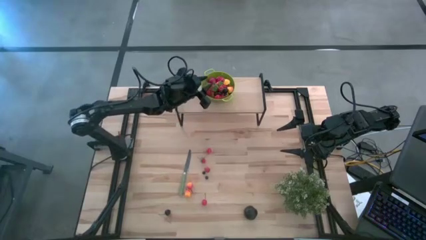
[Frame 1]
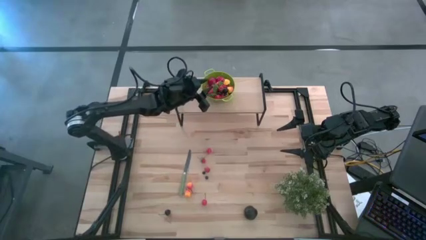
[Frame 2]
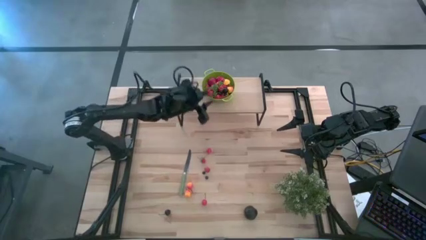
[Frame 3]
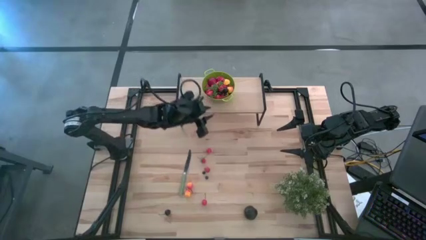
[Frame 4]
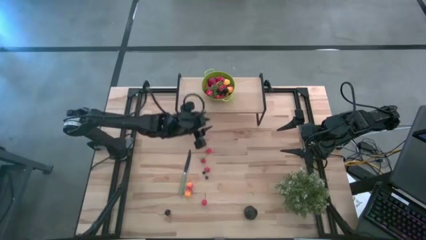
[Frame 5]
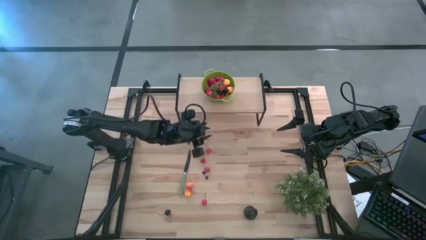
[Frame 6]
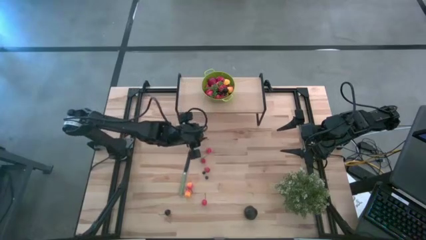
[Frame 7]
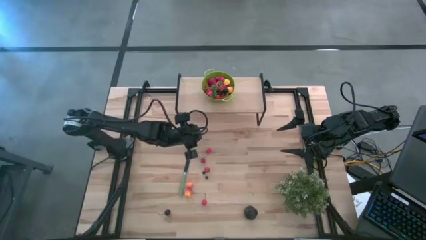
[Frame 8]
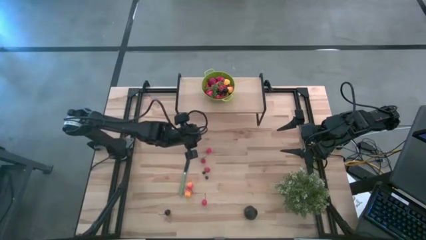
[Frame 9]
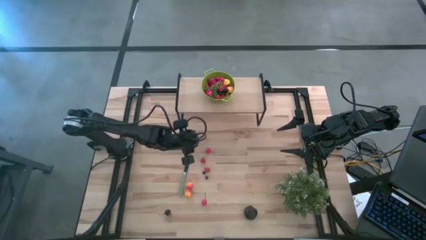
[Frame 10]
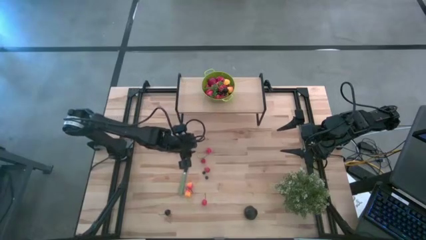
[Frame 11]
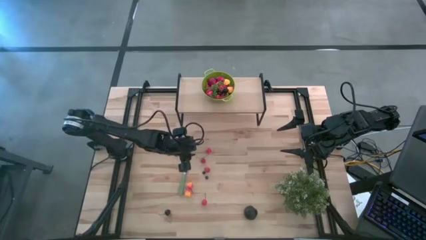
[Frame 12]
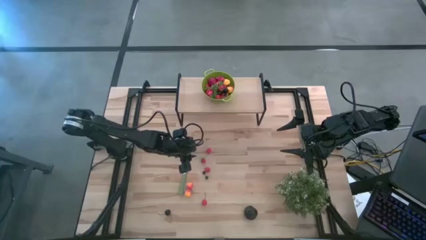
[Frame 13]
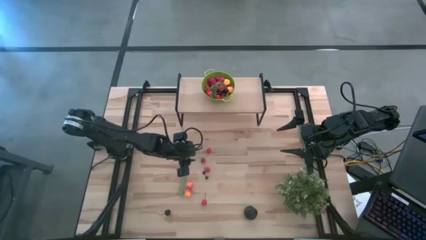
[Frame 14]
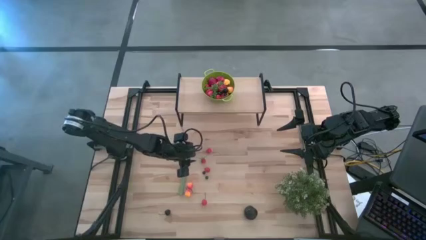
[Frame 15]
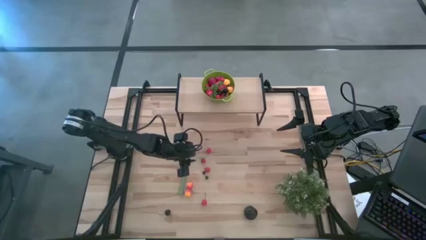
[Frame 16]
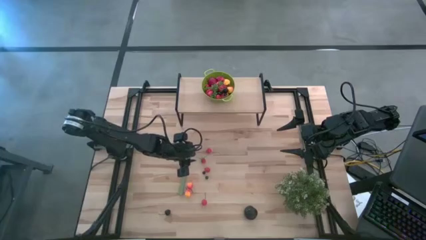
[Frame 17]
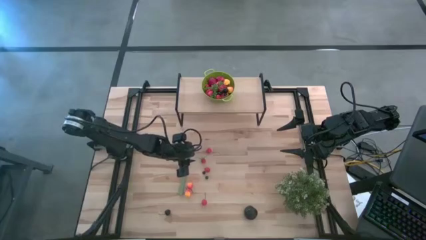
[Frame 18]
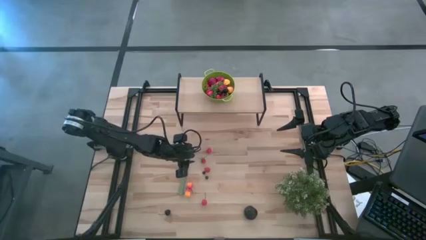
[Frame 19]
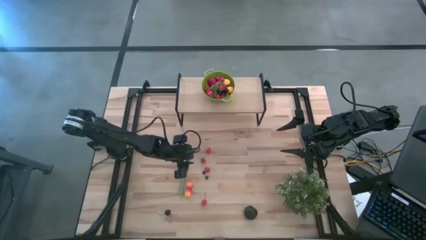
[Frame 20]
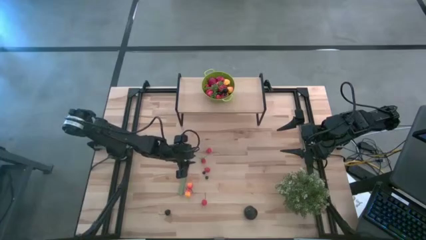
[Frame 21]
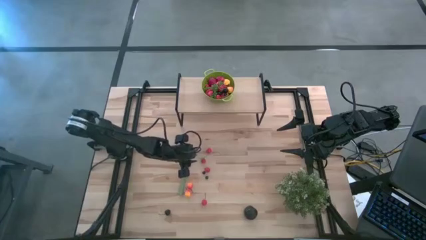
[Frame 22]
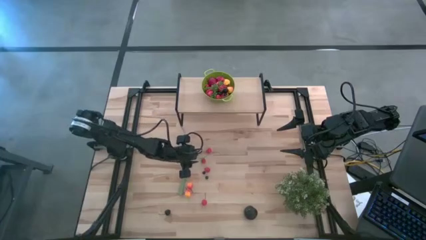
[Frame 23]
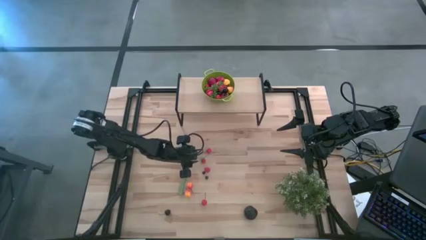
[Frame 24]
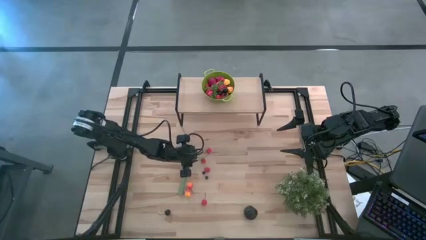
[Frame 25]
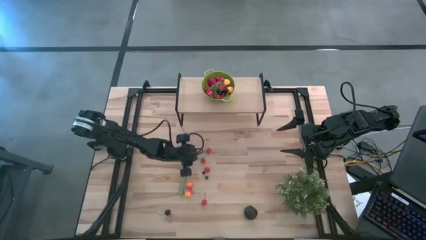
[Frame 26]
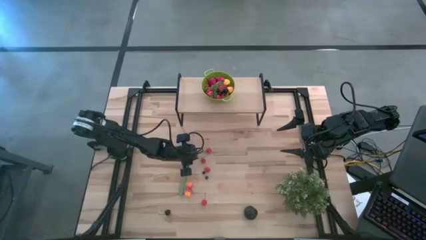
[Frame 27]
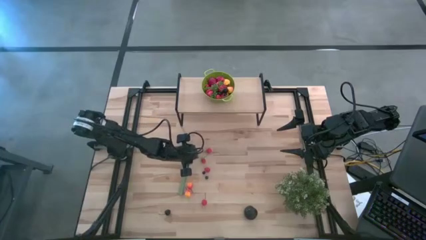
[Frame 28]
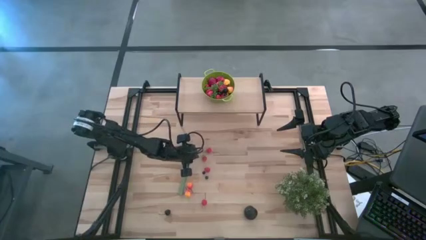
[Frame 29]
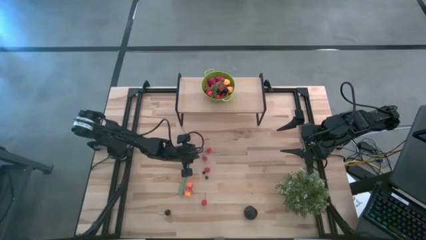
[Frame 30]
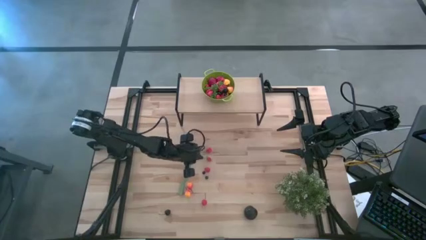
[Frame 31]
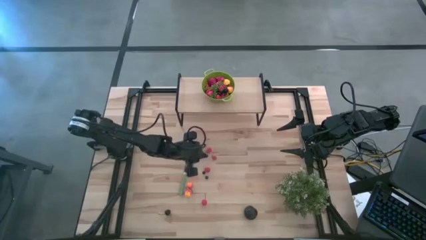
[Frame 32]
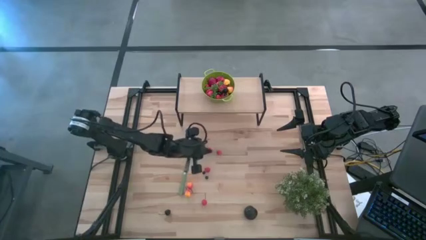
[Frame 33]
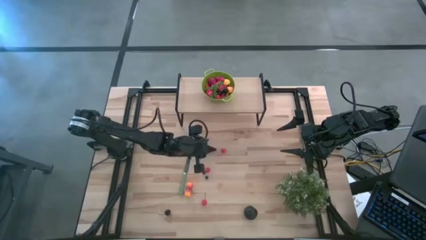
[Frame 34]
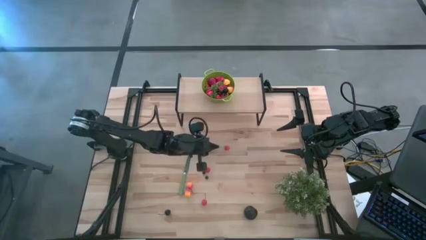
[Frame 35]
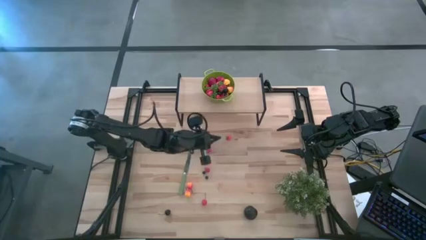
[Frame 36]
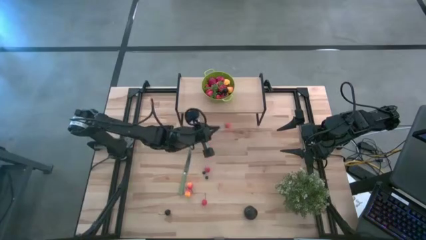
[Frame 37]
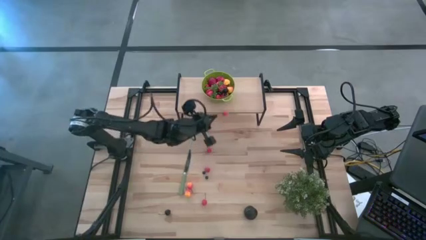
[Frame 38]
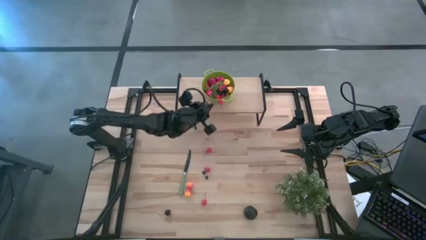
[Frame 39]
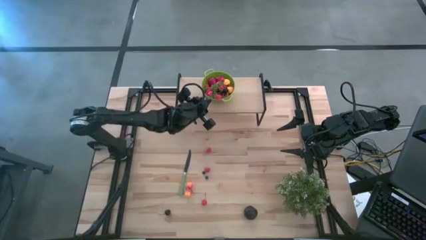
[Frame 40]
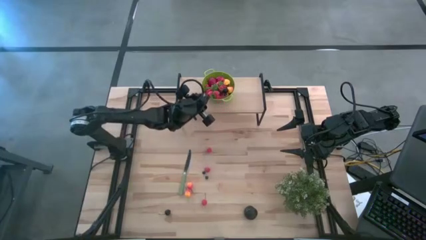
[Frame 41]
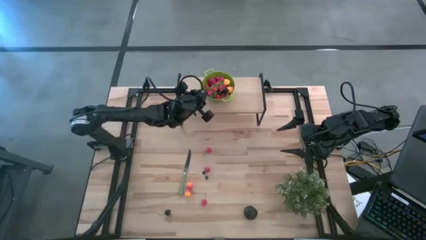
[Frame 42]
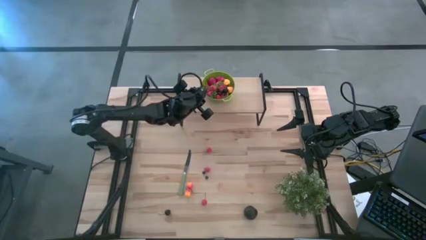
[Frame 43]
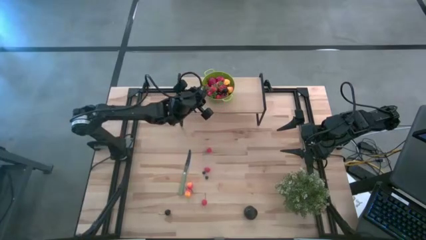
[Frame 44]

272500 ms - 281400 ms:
Task: Pick & Place Fruit
Put the strawberry into the green colander on the shelf

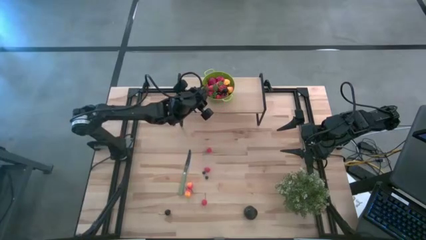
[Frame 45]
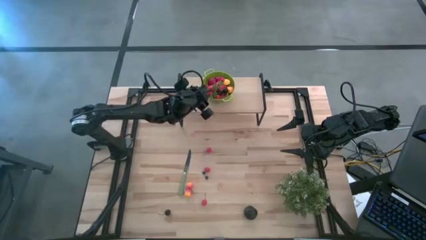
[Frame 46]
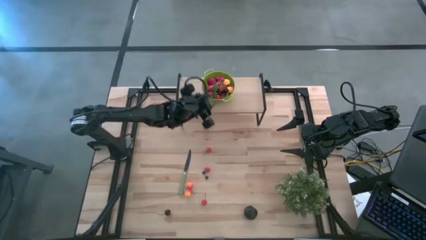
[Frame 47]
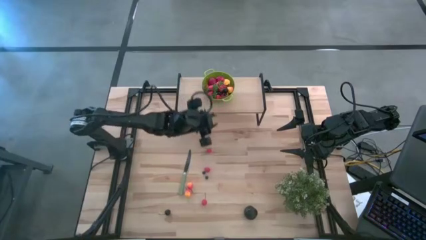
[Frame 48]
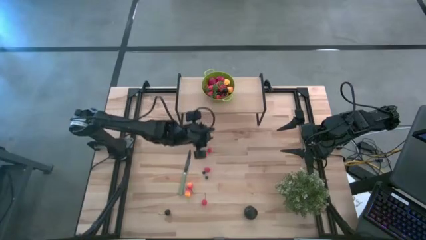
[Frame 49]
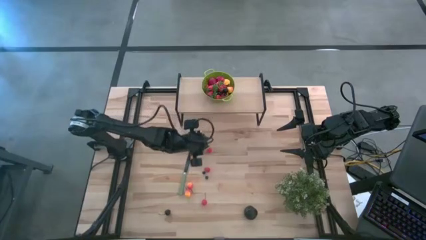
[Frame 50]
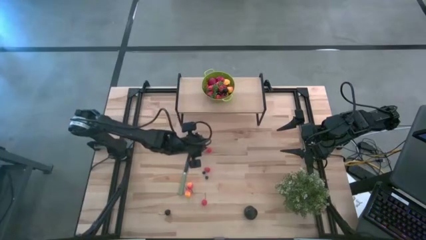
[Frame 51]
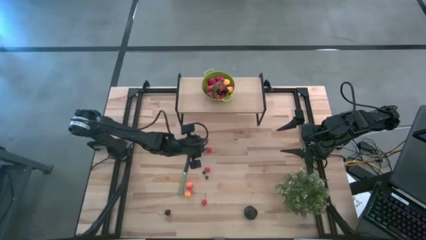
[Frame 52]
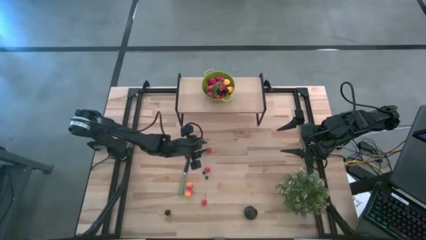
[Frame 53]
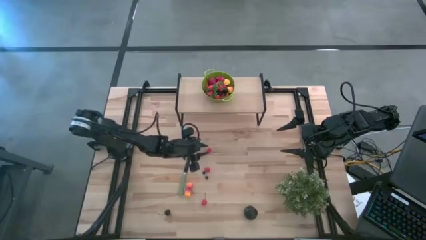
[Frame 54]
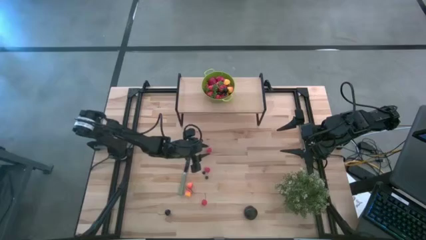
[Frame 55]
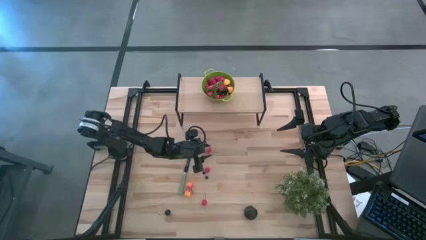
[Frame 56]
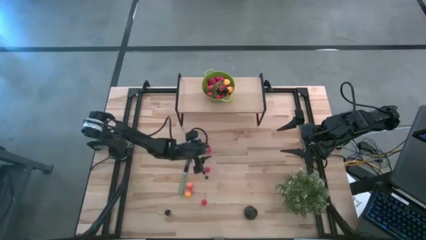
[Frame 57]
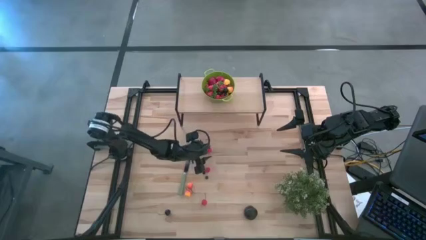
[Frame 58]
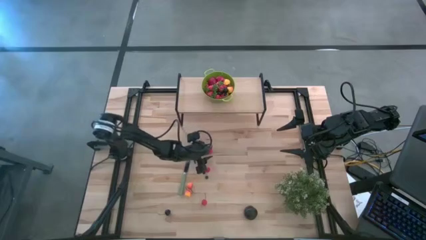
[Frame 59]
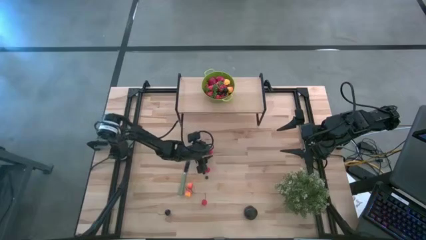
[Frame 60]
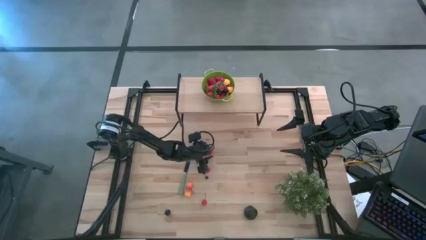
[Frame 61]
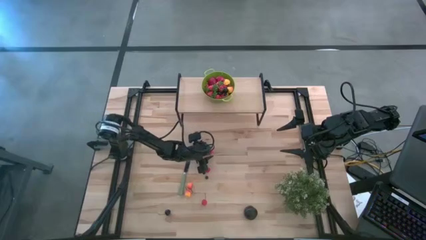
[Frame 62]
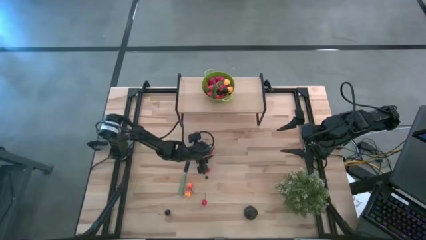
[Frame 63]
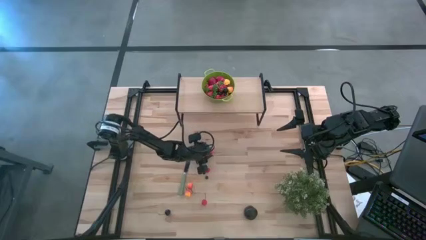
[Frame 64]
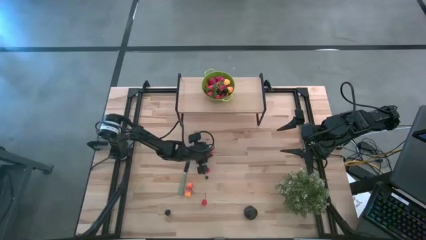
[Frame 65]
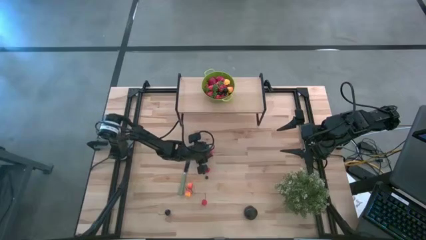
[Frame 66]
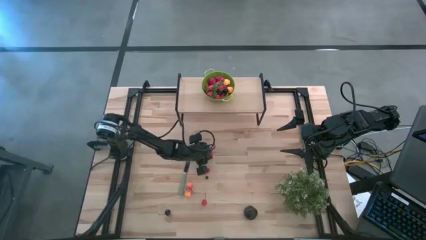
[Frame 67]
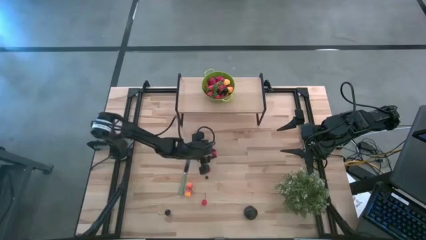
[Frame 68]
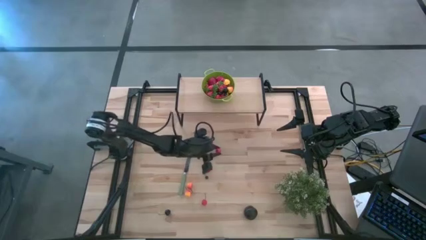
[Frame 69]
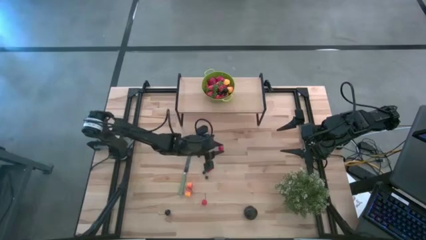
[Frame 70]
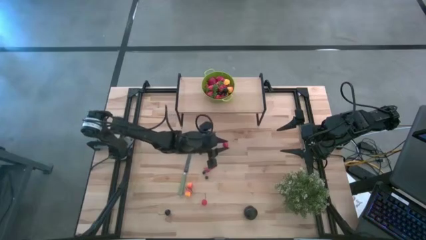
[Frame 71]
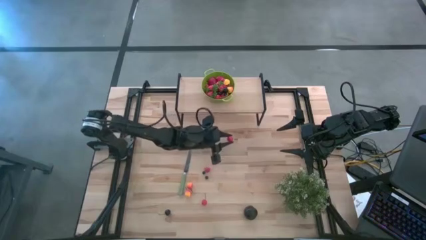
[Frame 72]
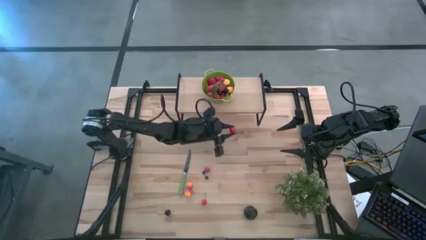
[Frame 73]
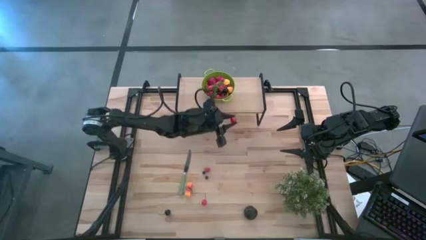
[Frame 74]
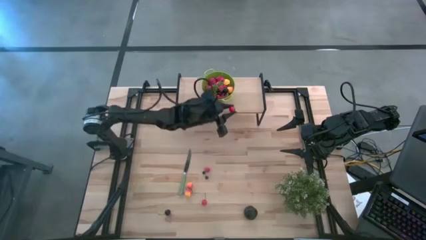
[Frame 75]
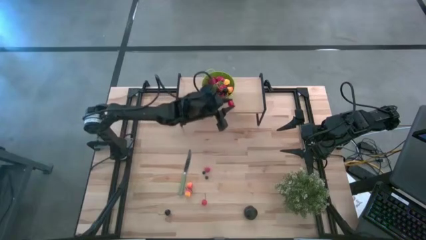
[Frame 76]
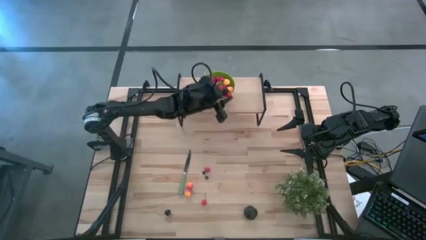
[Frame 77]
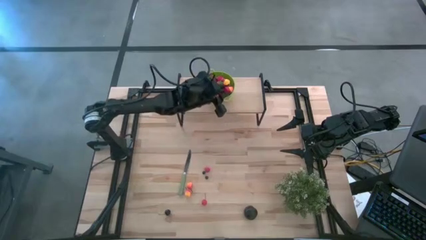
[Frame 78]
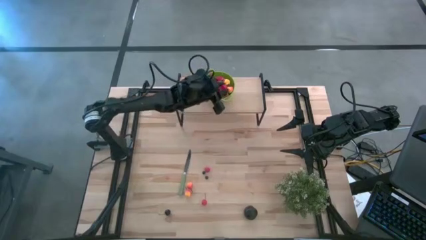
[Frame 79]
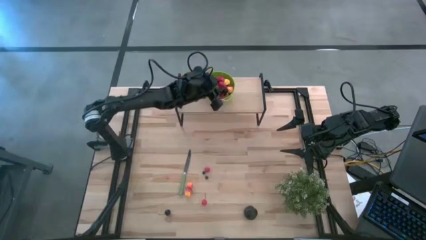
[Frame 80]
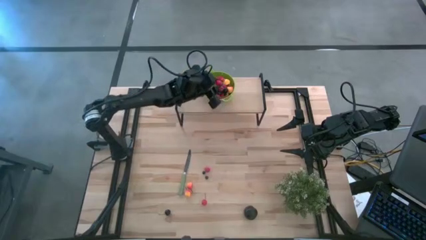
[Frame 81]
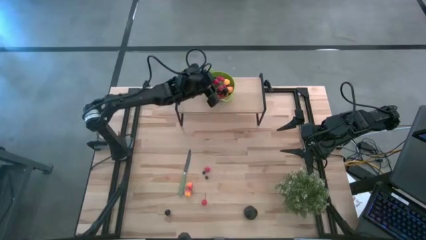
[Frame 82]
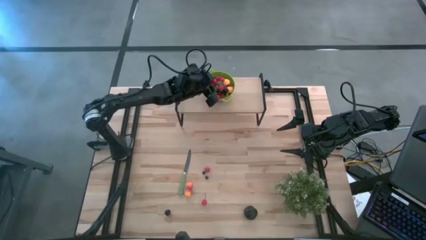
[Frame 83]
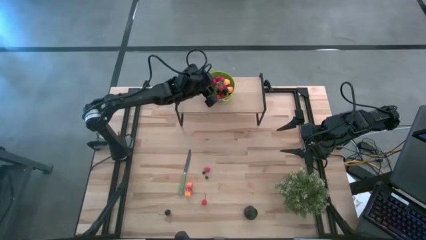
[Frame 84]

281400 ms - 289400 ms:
Put the red cherry into the green colander on the shelf
